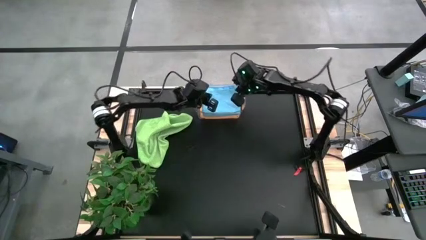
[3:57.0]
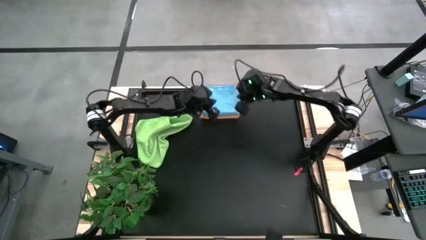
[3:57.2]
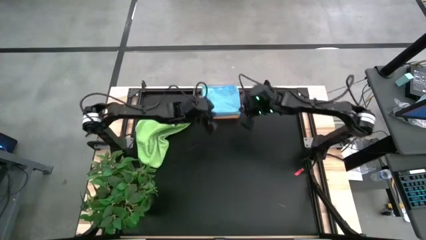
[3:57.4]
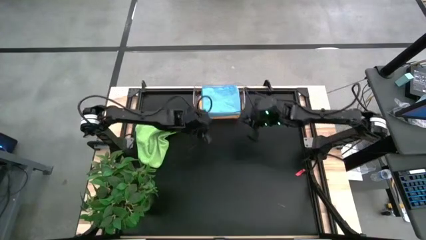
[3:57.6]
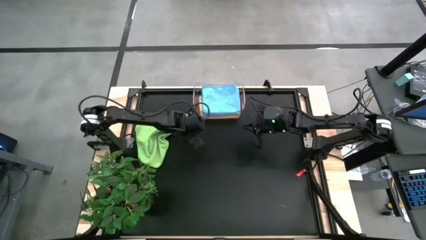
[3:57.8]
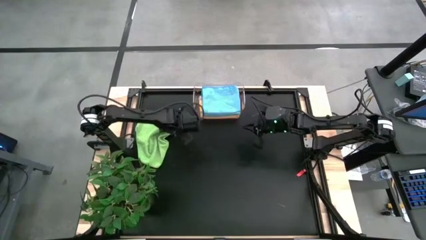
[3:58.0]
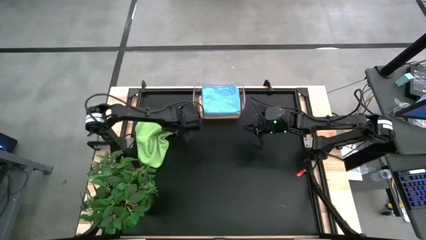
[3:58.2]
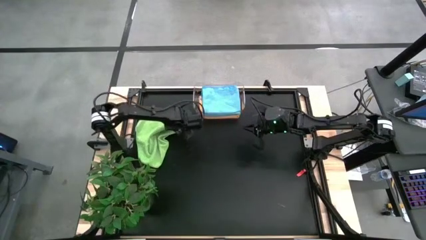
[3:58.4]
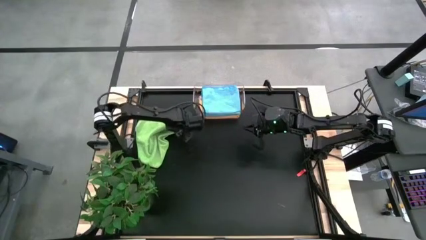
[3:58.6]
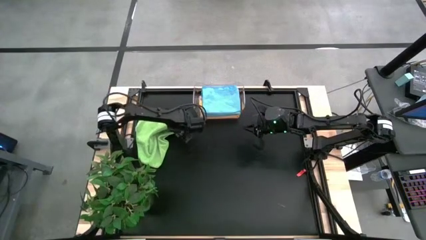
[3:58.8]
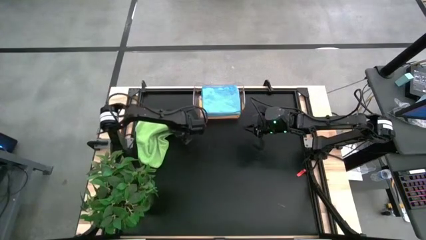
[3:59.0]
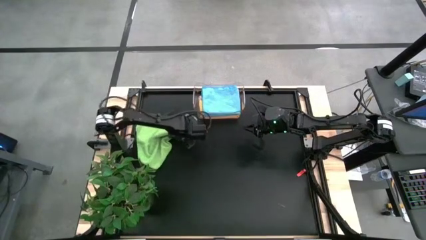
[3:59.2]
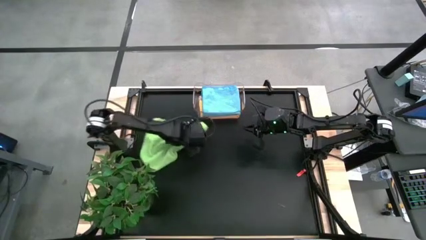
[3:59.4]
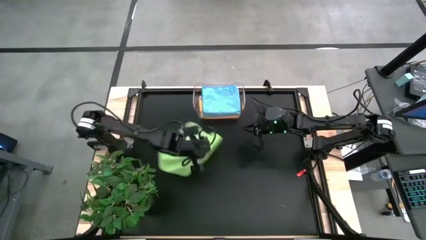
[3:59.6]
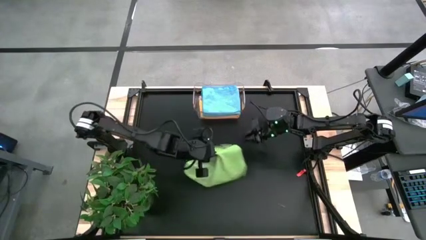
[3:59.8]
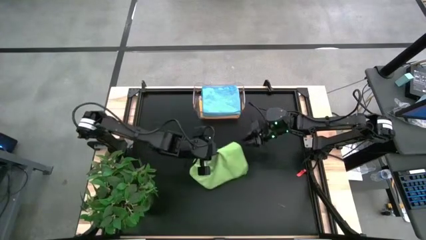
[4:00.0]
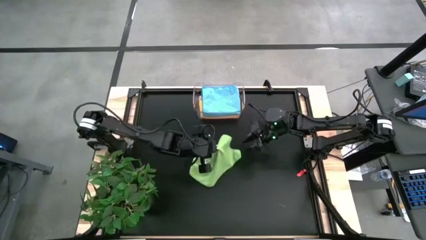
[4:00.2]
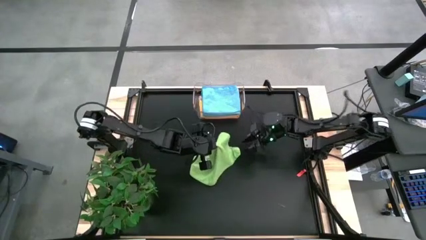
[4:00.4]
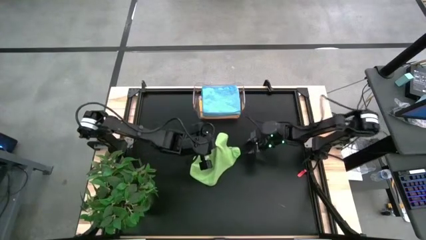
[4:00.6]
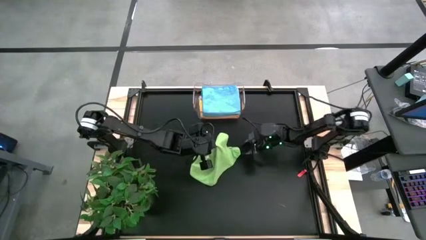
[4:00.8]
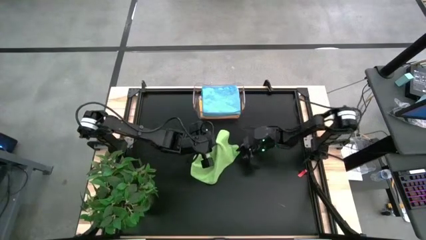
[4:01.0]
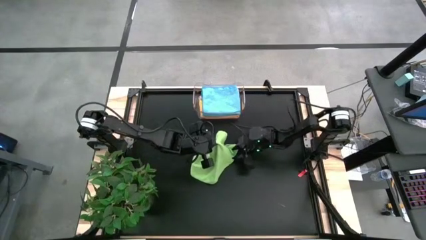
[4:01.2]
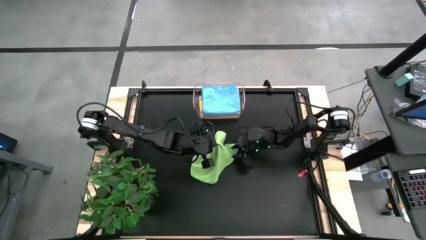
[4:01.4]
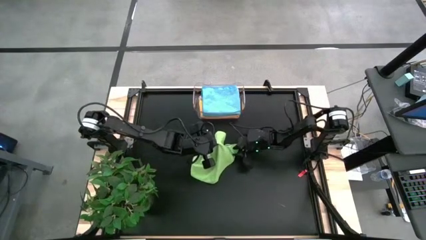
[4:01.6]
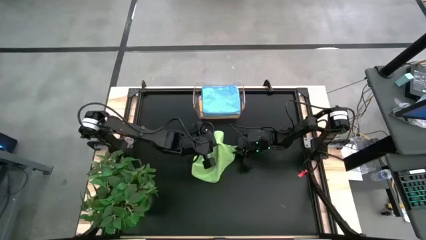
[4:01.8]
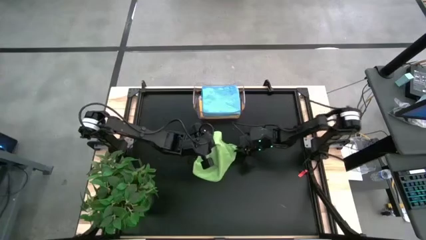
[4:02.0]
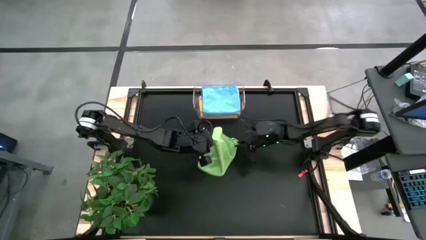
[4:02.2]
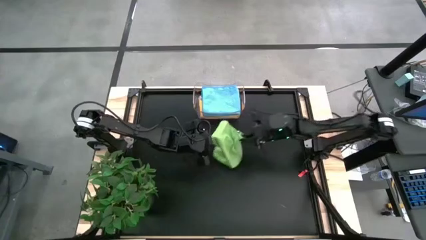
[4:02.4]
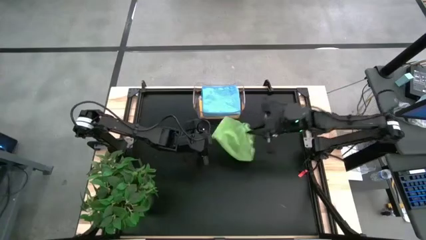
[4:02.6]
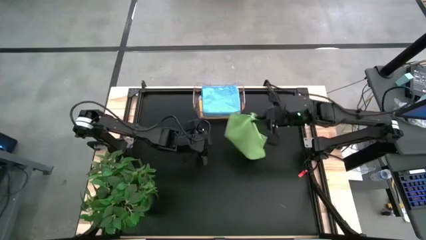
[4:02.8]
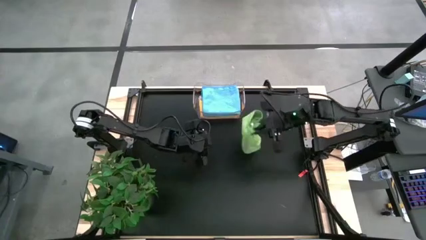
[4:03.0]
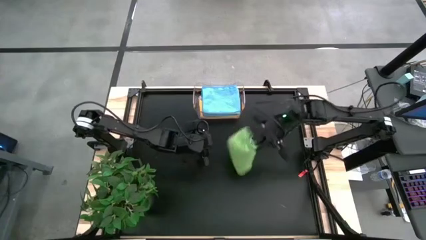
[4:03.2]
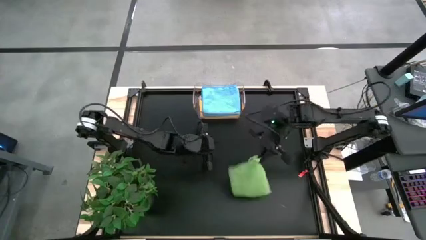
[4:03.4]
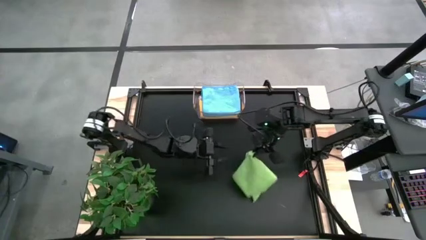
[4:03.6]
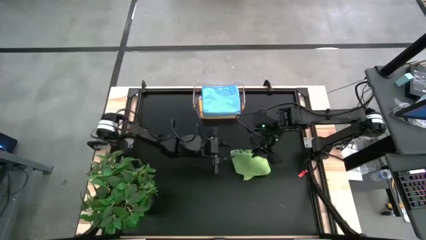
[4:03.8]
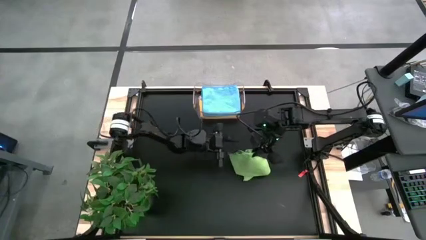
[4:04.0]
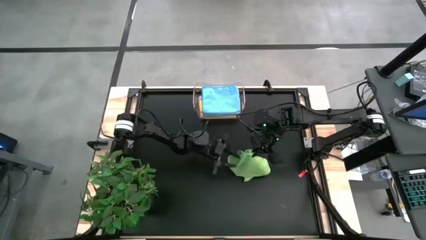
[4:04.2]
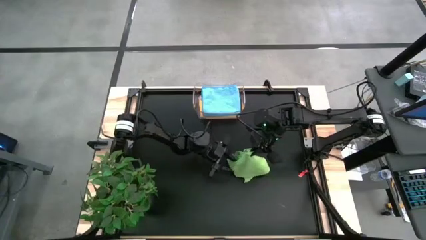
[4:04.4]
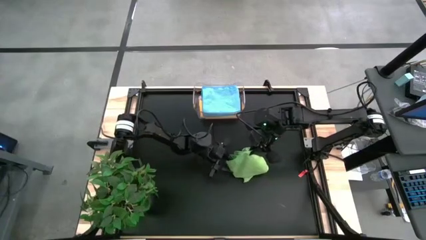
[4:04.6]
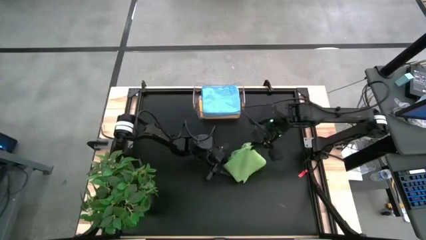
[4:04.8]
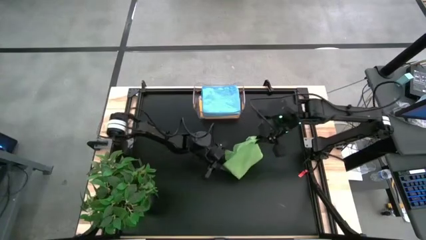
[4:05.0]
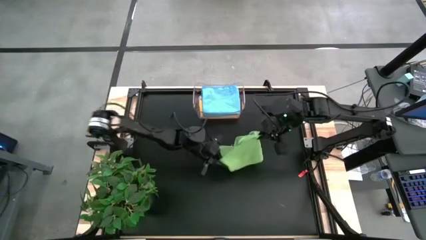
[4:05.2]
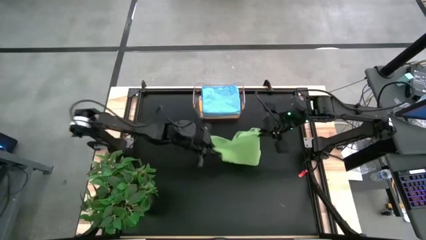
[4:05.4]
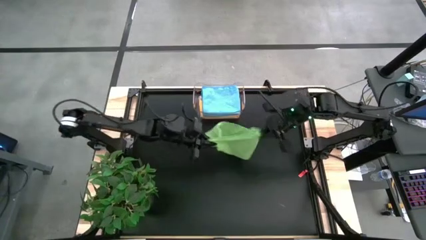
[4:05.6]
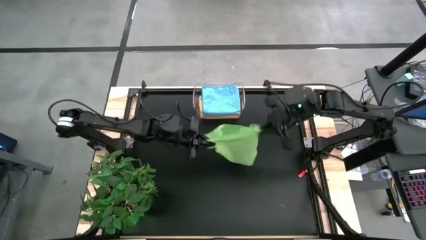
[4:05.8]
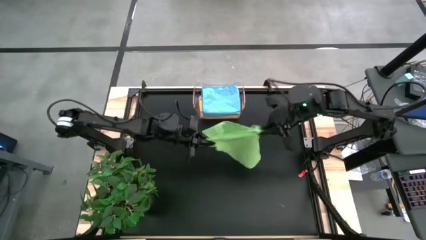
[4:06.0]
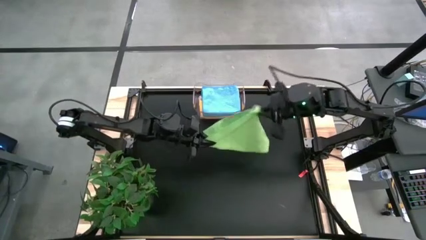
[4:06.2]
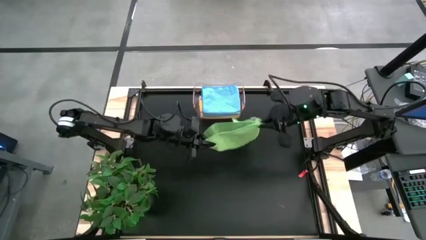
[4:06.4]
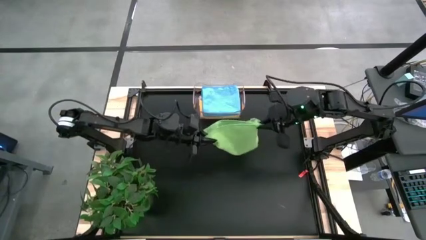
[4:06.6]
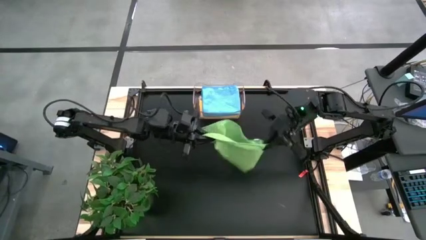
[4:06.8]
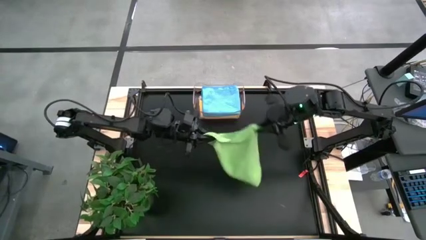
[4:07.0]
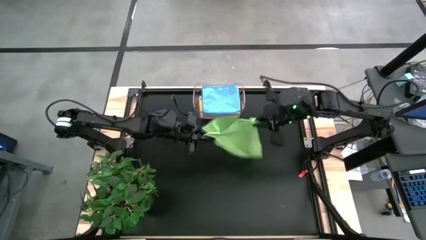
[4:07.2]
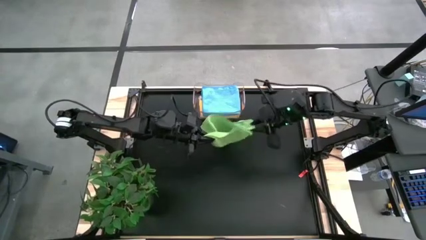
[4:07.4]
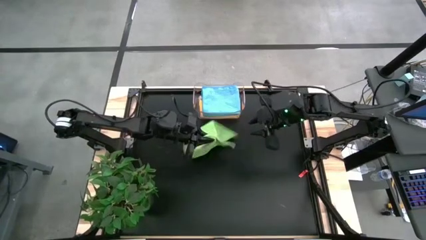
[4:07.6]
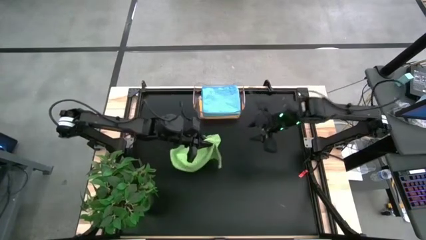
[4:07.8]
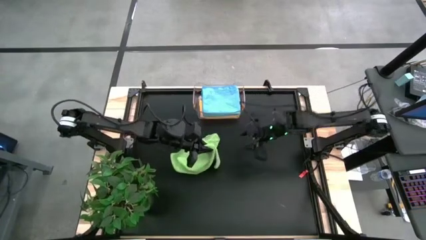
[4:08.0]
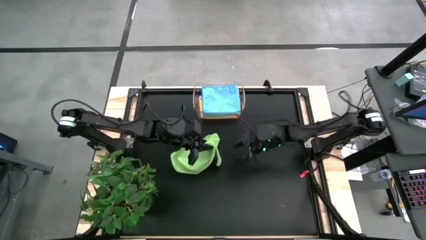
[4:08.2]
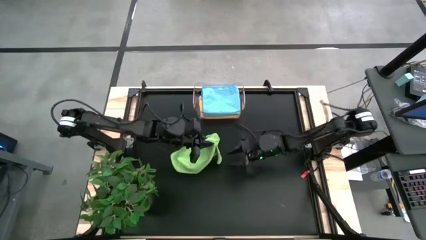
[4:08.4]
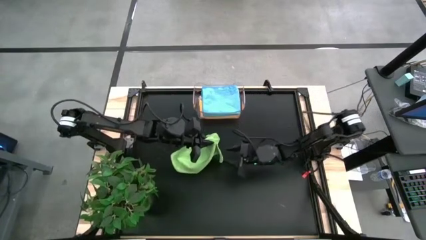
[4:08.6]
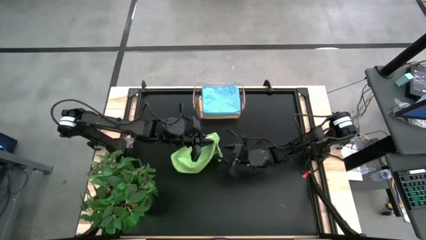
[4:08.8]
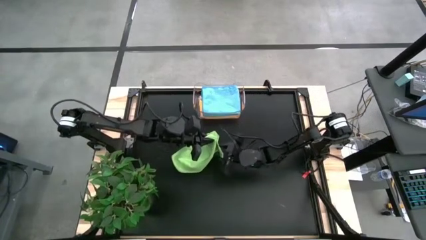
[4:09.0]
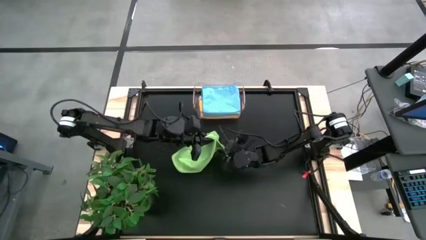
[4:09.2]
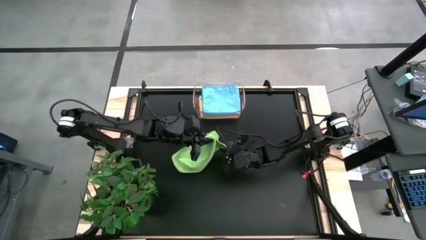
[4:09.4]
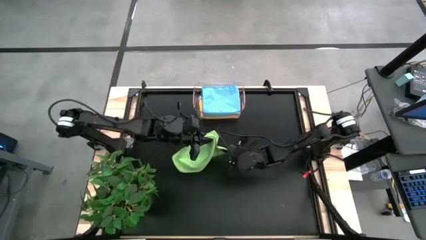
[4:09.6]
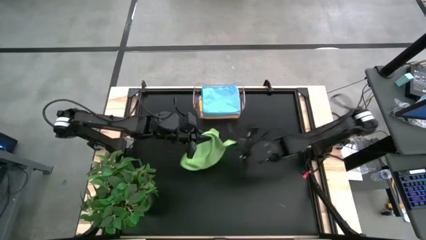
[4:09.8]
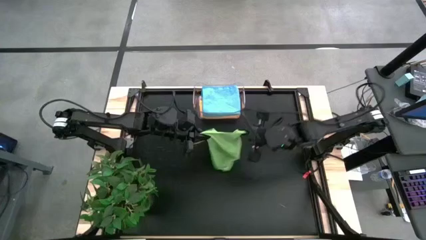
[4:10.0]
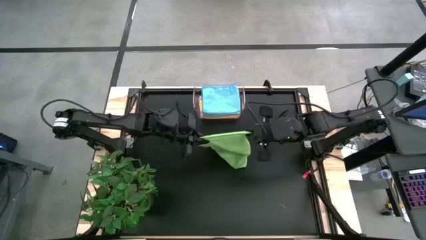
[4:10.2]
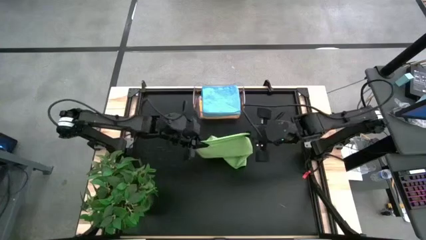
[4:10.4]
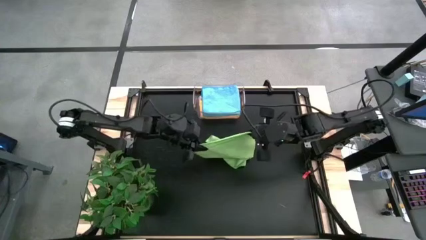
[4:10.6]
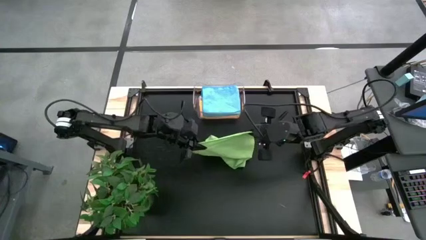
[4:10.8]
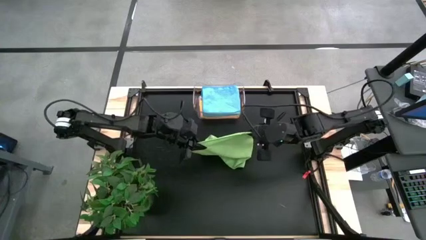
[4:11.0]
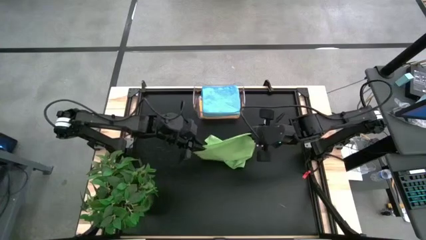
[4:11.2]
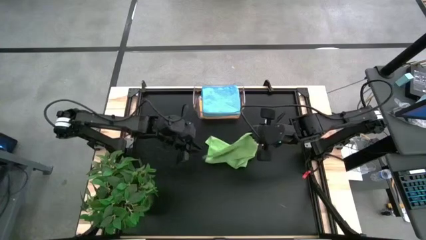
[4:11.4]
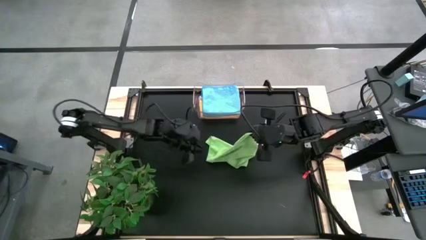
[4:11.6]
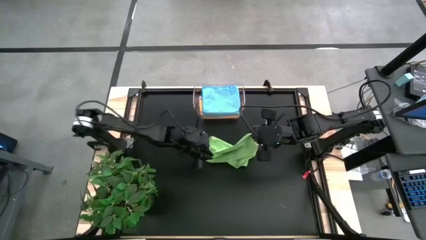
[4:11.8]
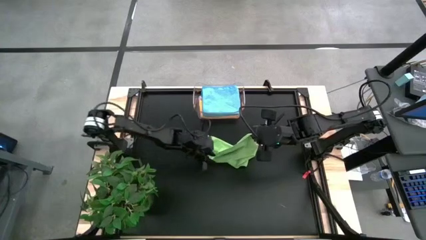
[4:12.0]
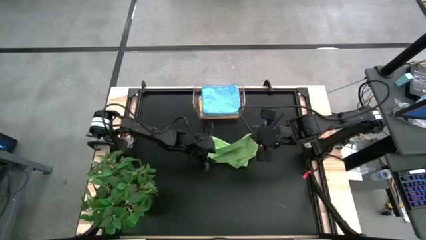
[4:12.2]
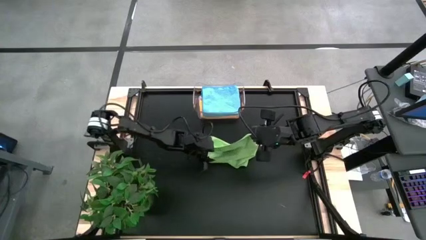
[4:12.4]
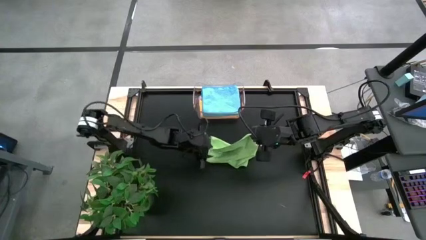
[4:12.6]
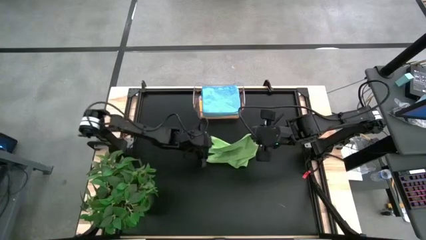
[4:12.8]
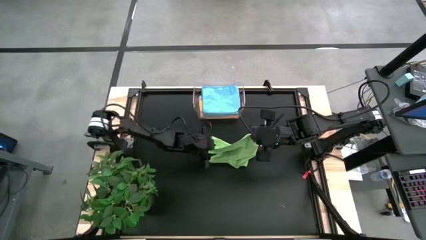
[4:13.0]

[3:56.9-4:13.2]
Task: Fold microfiber towels
Fold the green microfiber cloth

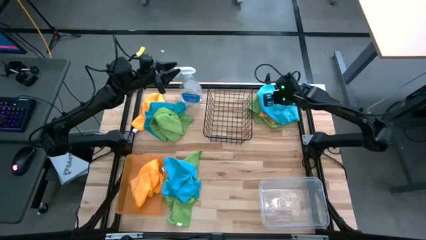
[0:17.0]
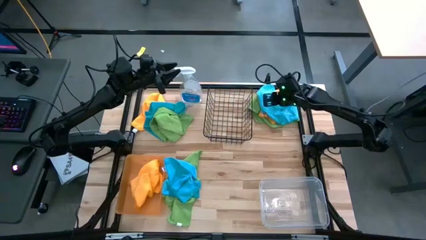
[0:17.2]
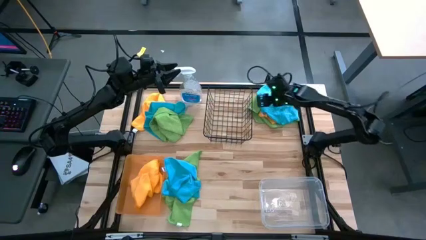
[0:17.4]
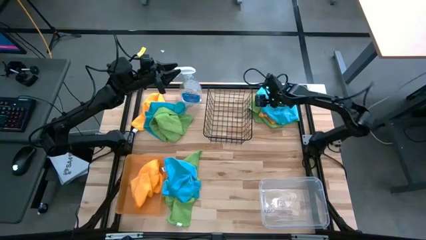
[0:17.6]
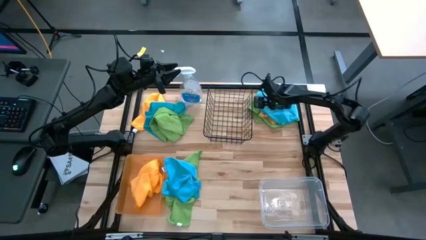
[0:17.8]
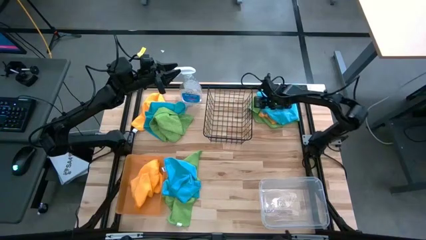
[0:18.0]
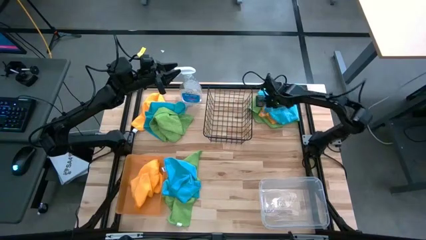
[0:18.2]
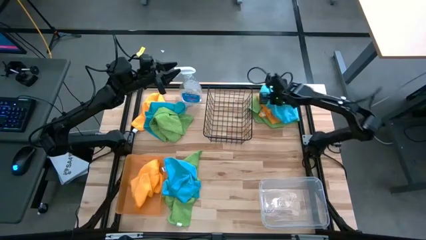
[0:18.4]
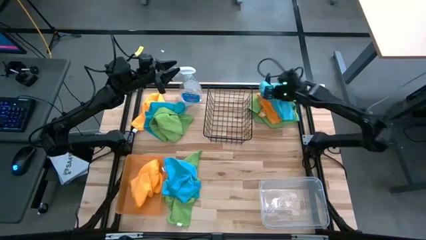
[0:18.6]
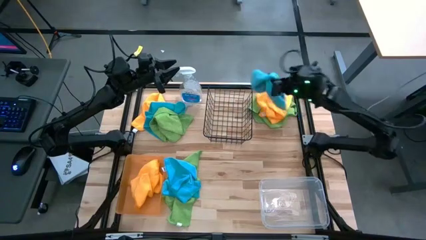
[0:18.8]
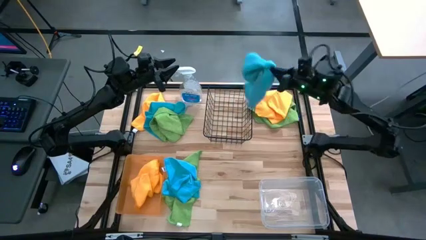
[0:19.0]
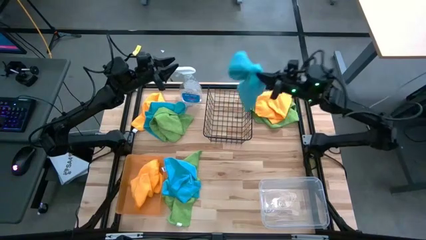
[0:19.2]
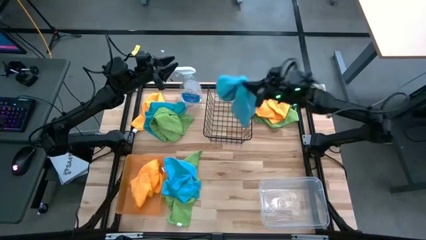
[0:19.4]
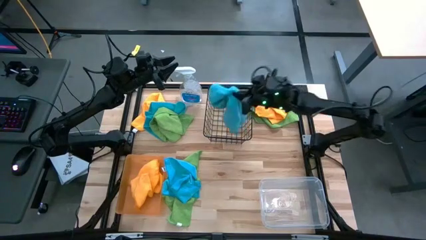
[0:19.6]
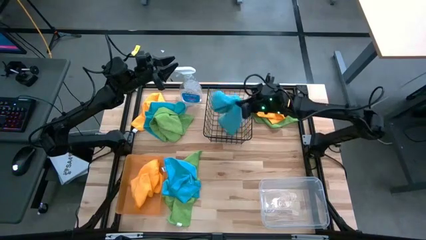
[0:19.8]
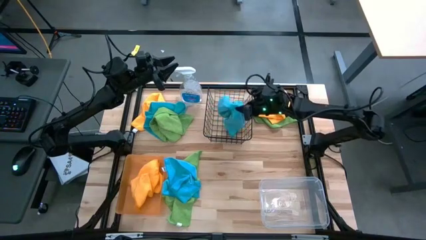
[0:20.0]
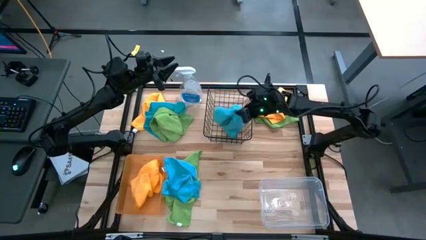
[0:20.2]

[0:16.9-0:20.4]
Task: Sort microfiber towel by color & place in baskets
Put the top right blue towel into the black basket
